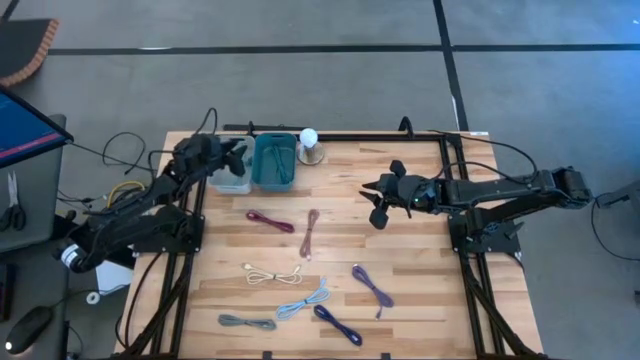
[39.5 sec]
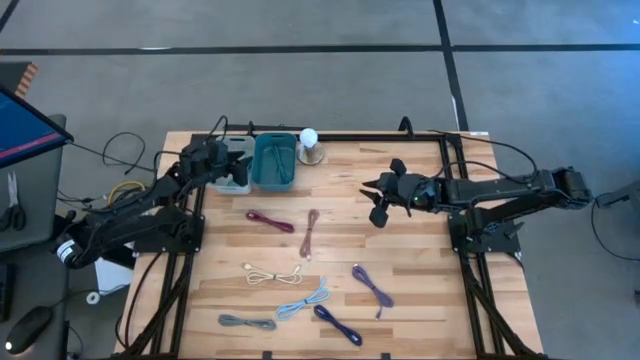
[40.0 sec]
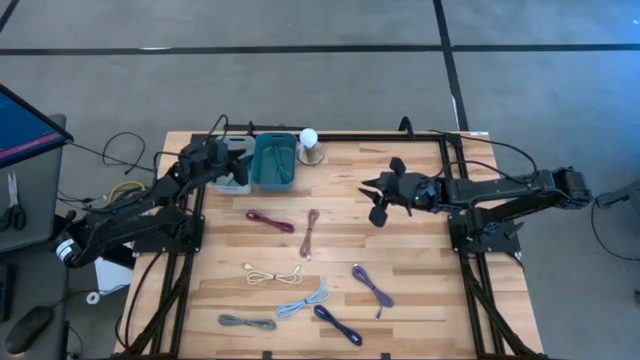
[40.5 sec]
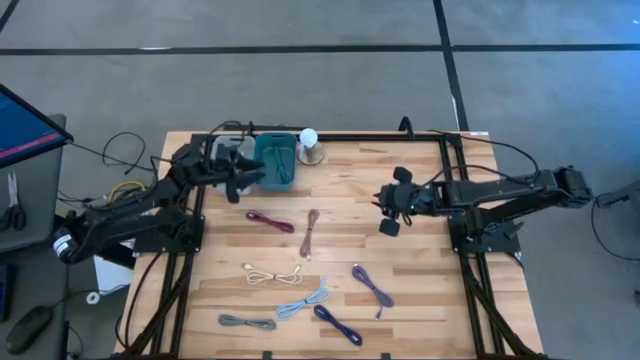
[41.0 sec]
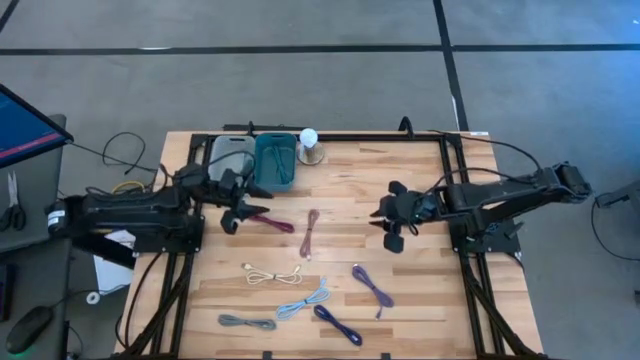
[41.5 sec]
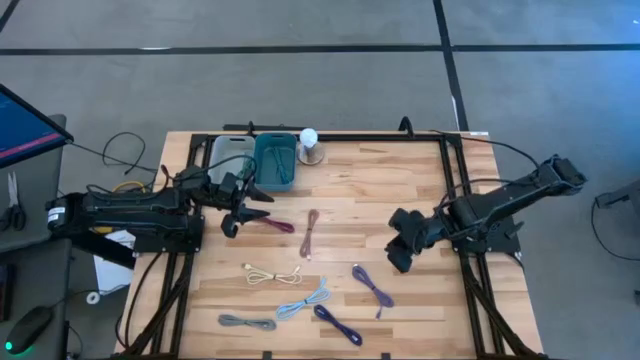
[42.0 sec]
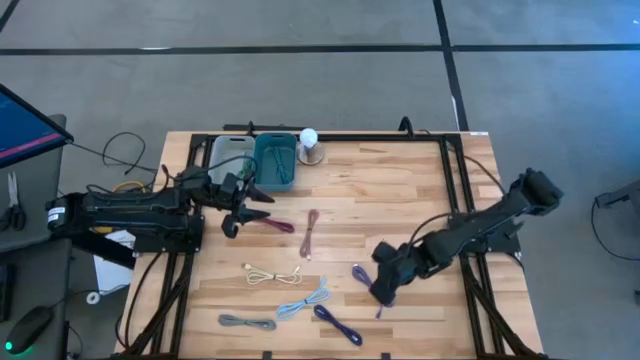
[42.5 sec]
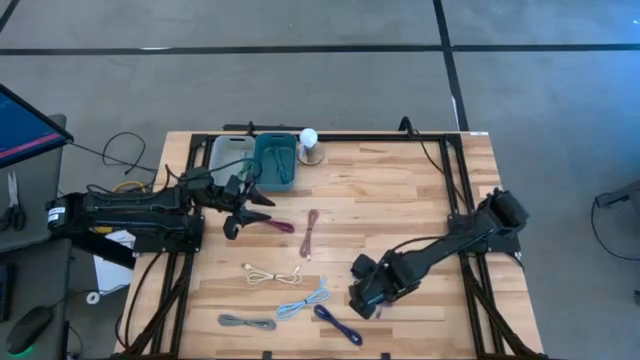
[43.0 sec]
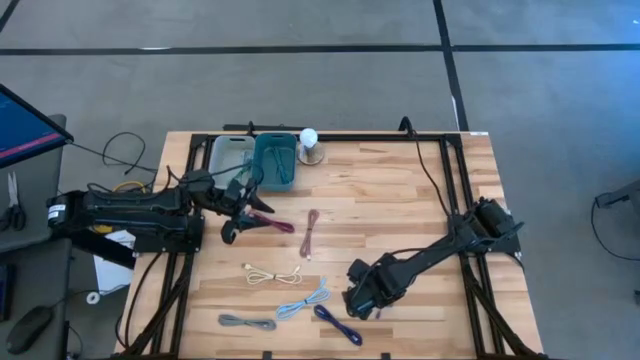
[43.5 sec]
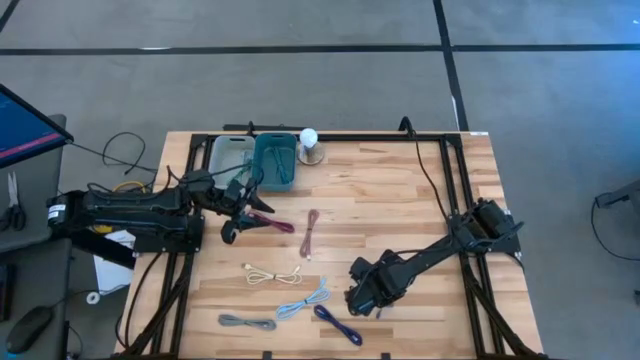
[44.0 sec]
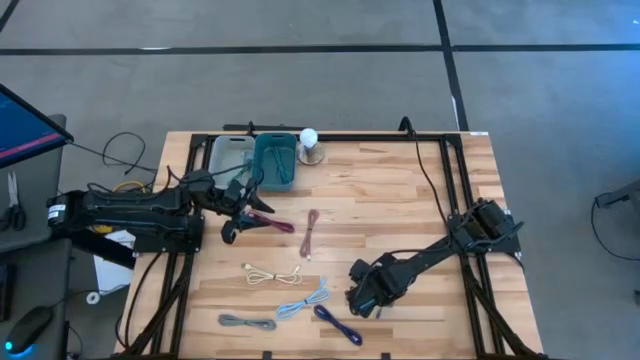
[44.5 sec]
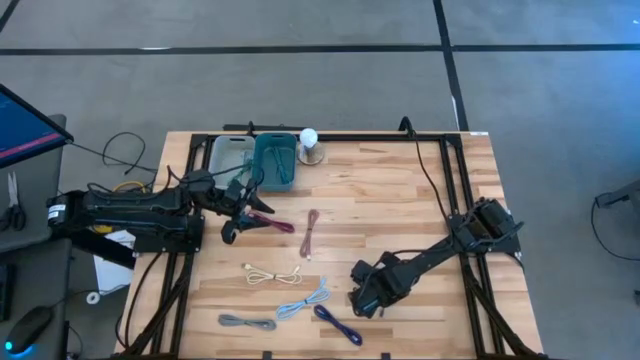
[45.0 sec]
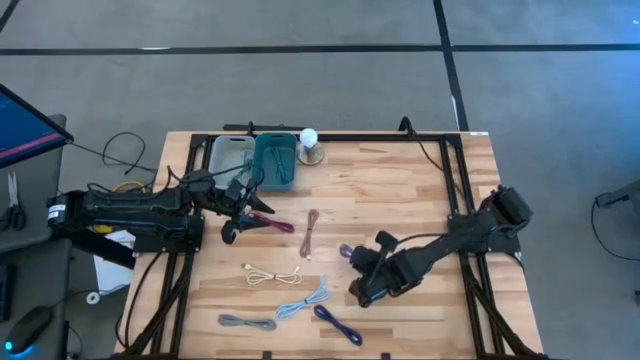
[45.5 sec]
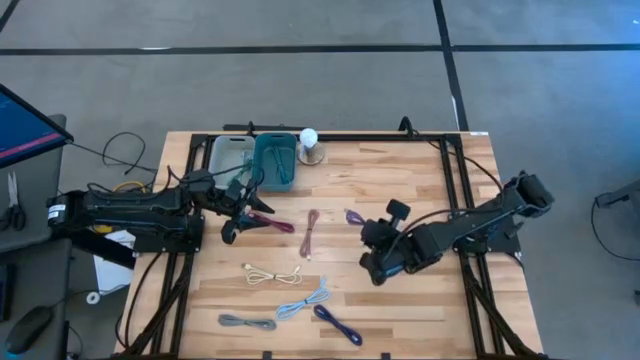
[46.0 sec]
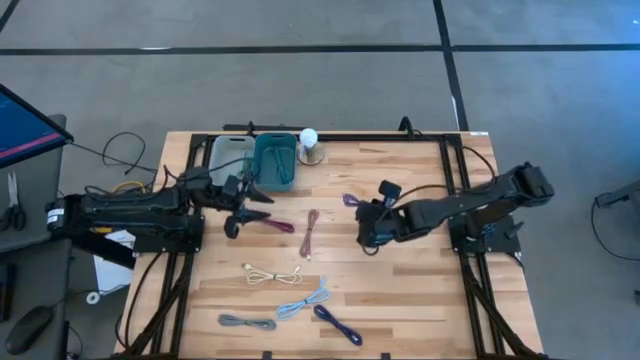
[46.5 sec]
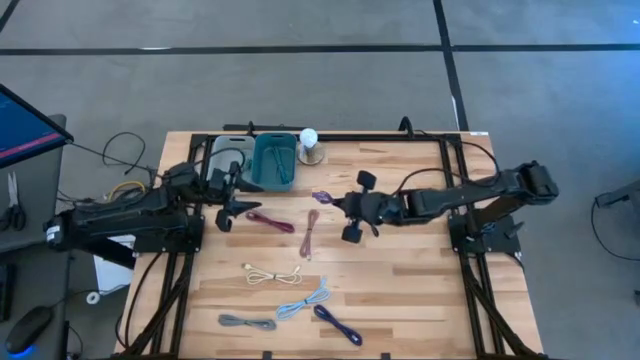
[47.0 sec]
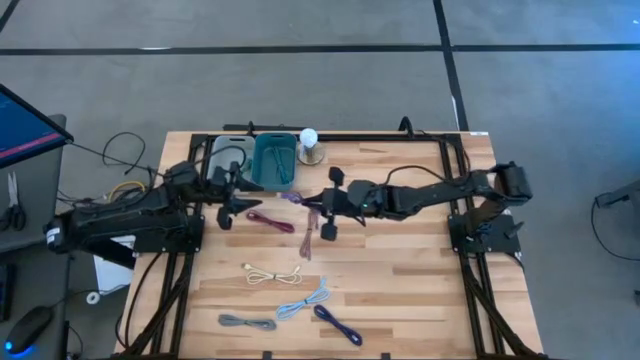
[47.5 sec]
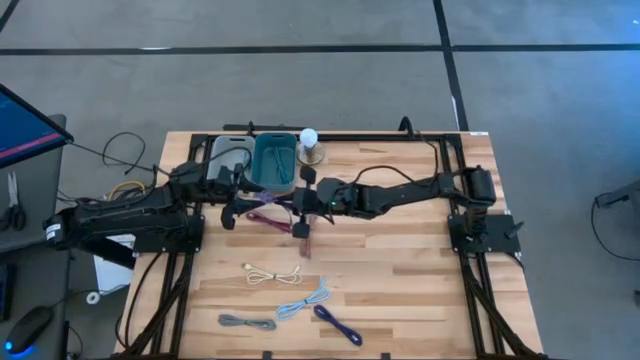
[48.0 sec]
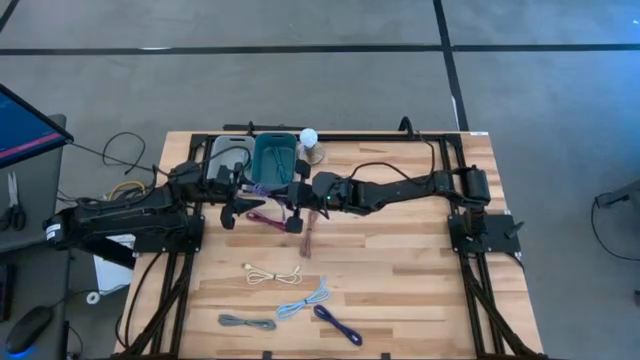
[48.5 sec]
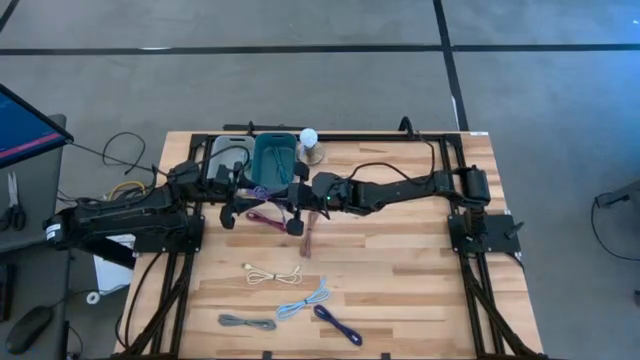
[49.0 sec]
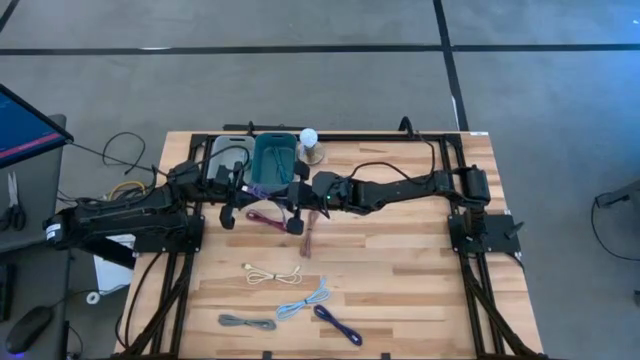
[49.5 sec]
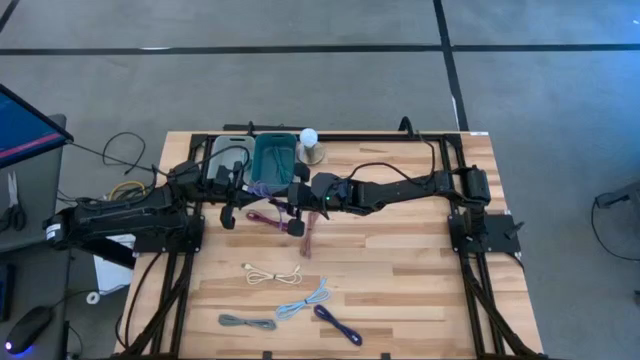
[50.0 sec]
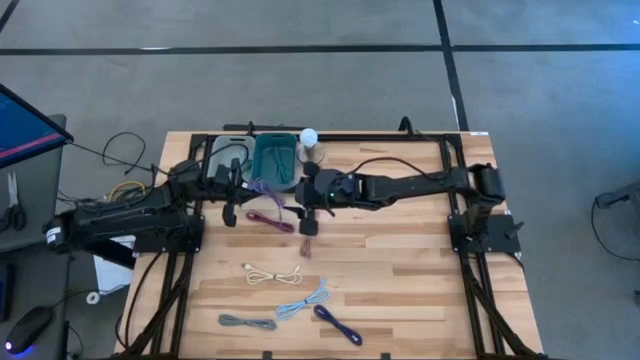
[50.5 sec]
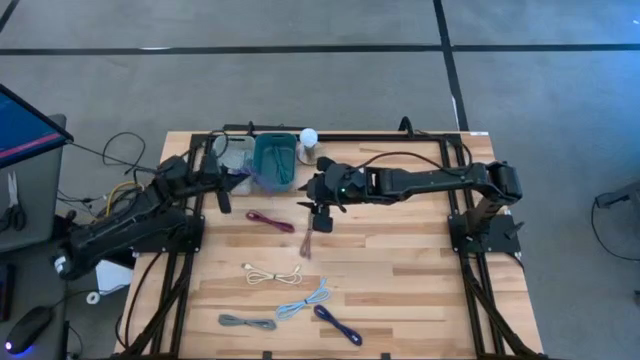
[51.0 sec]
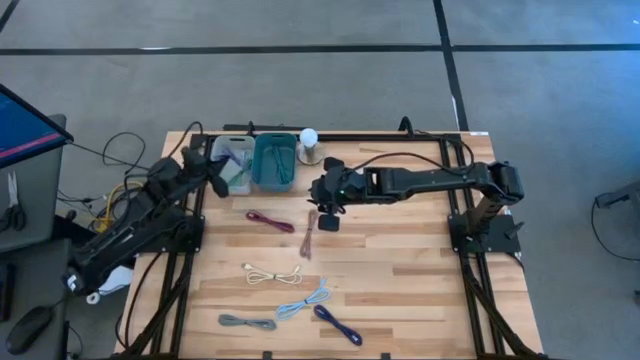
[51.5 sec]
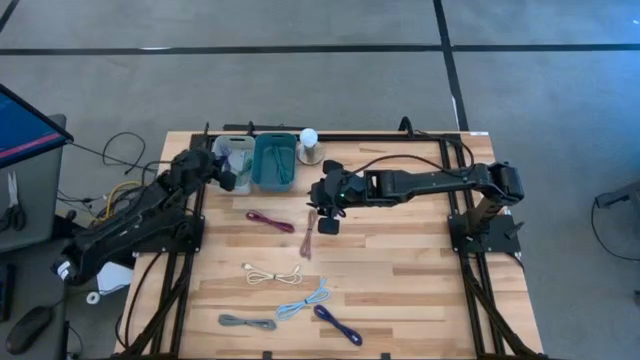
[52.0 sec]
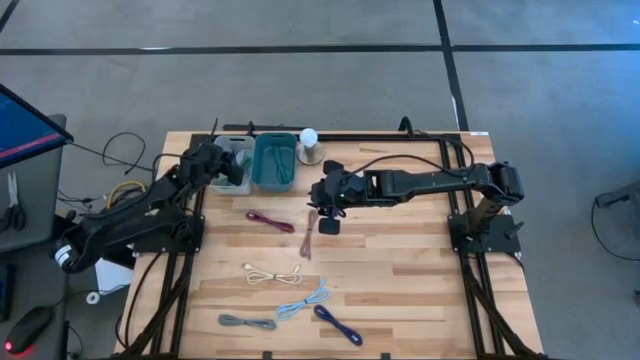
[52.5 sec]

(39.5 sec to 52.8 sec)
Task: Pick & Place USB Port
Put the purple charger cable into the gray bin

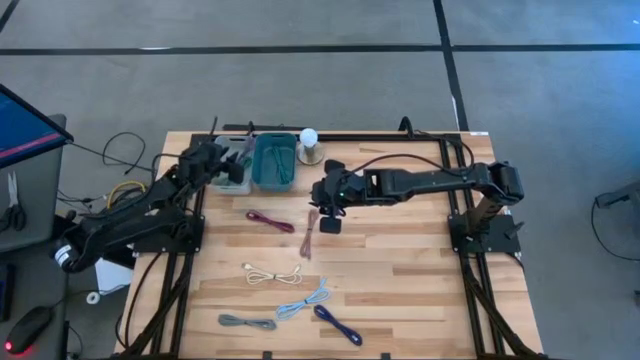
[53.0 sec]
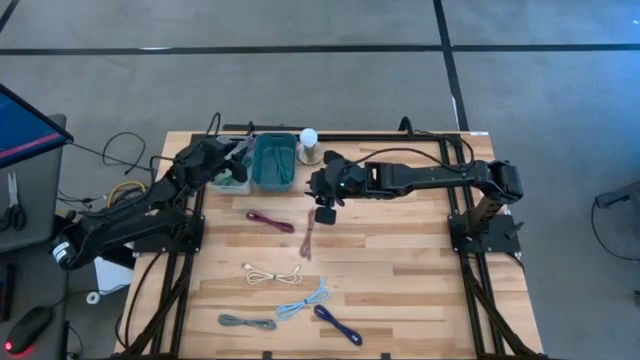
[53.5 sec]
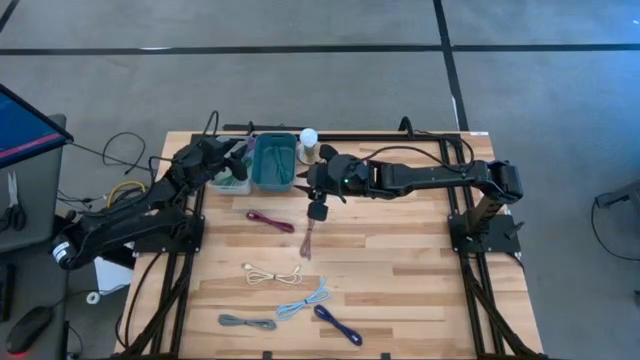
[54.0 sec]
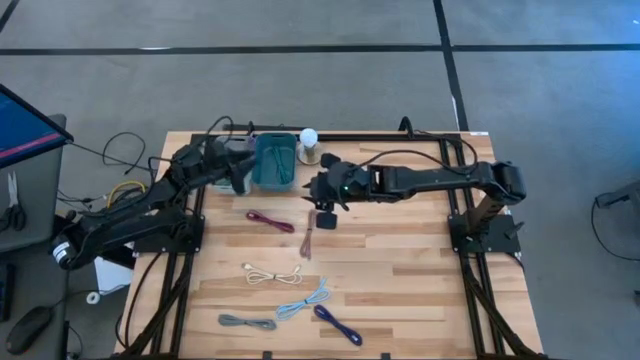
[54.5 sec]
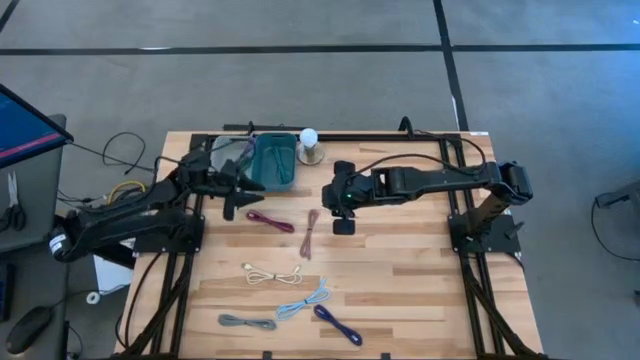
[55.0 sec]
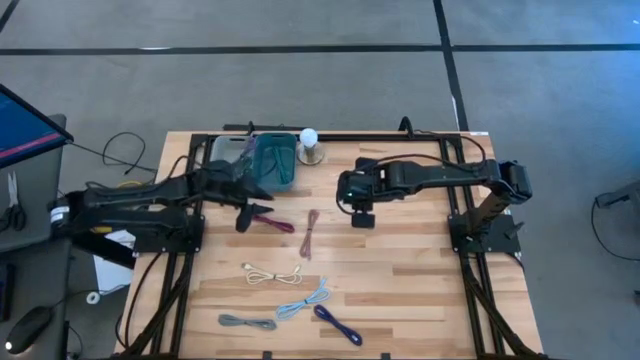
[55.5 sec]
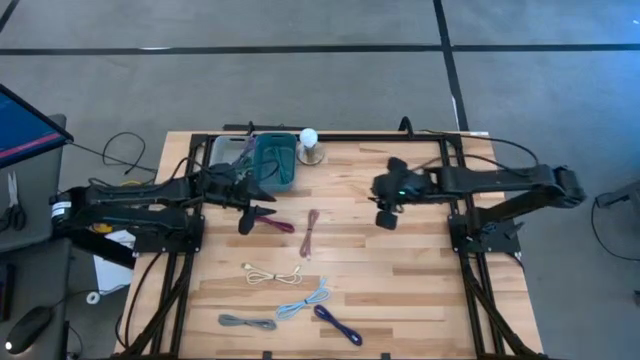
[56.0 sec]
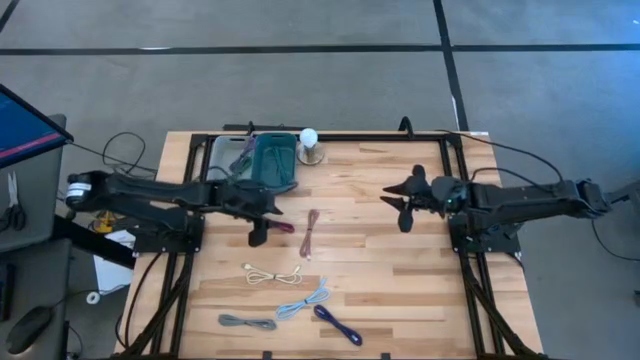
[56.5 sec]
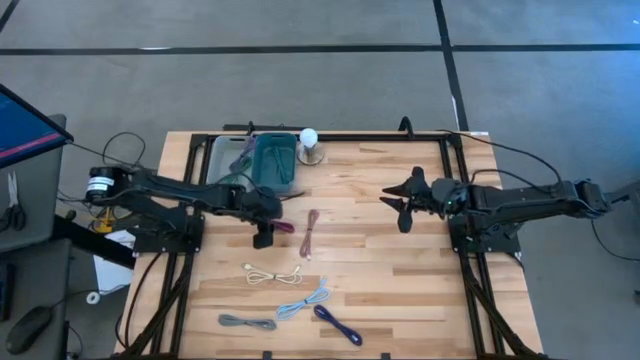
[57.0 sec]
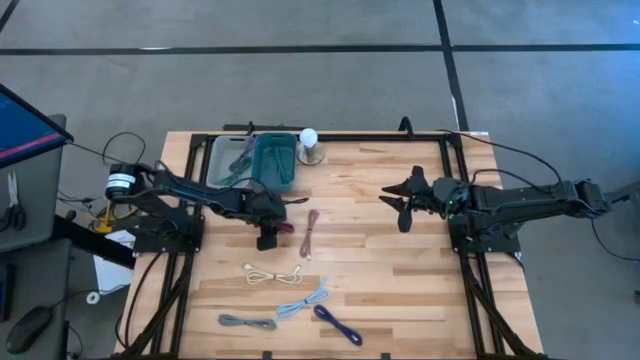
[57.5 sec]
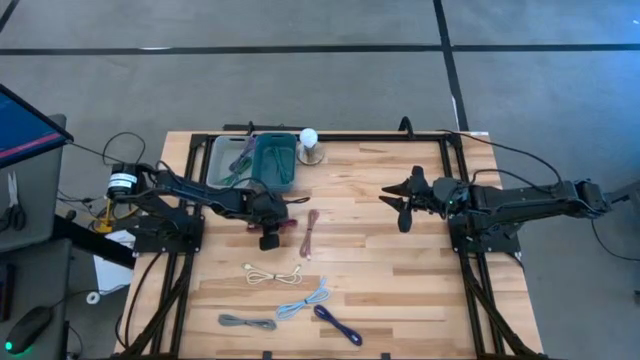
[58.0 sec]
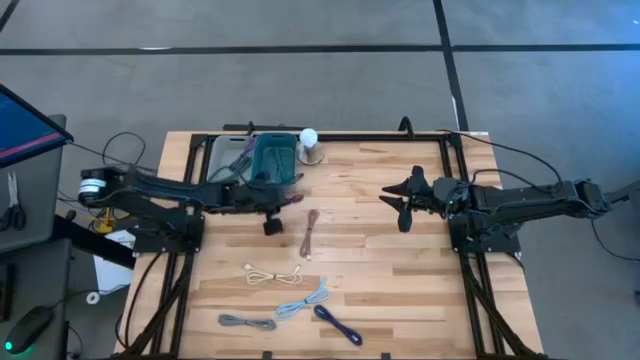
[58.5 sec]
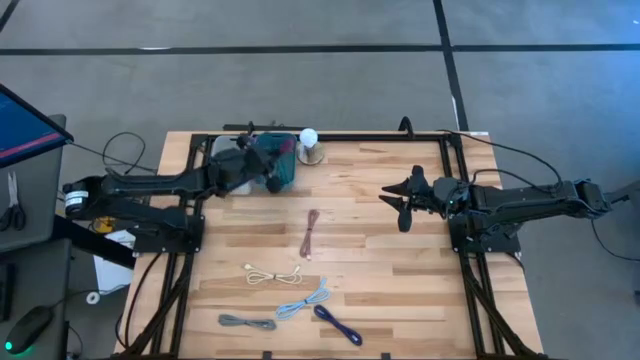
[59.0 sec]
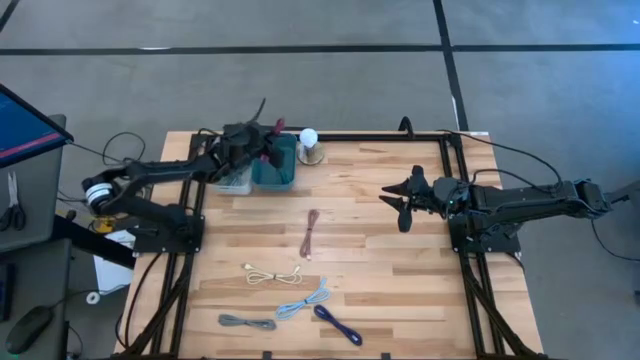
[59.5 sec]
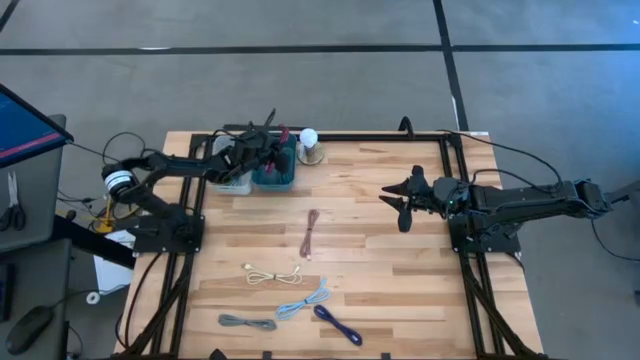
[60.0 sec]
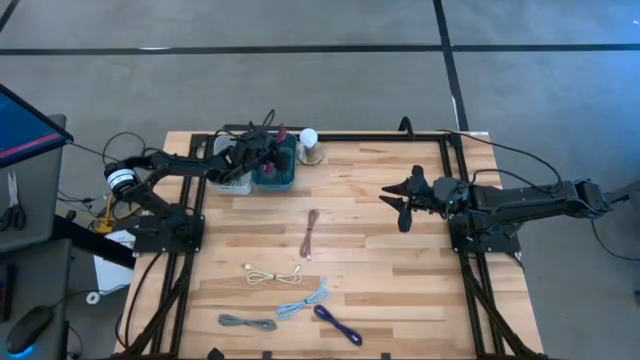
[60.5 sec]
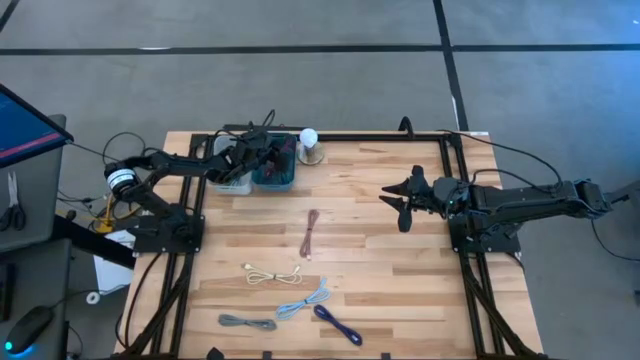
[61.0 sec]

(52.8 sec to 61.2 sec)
Put the pink patterned charger cable into the blue bin
